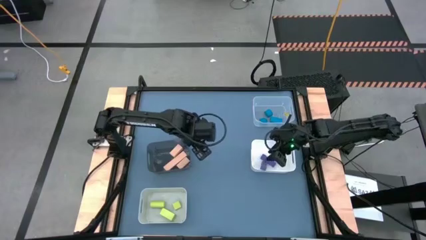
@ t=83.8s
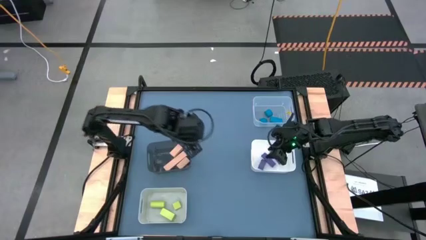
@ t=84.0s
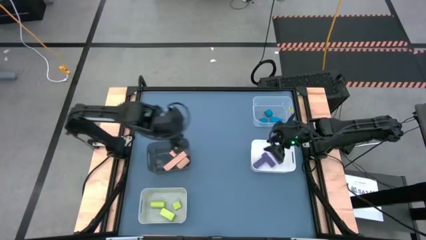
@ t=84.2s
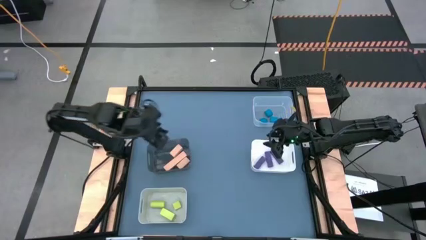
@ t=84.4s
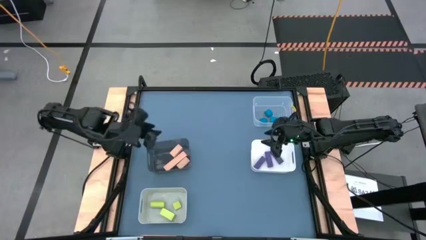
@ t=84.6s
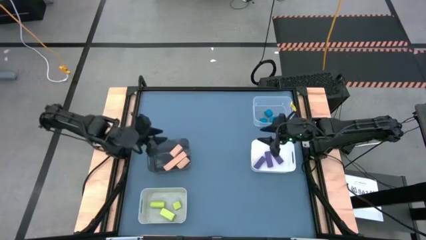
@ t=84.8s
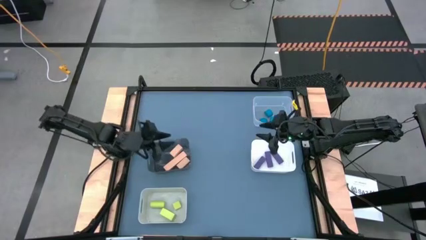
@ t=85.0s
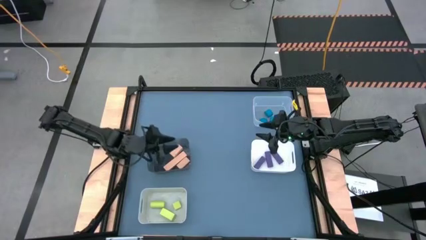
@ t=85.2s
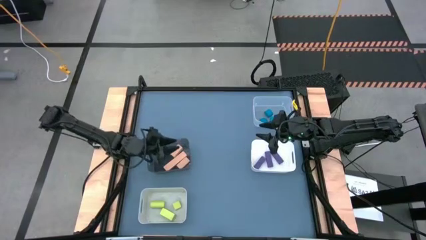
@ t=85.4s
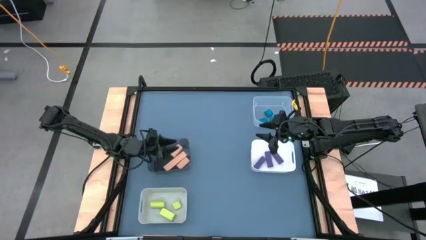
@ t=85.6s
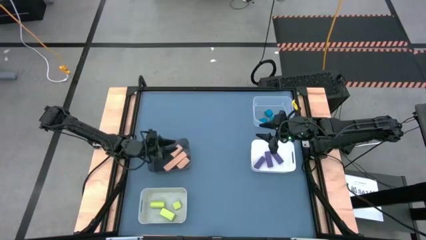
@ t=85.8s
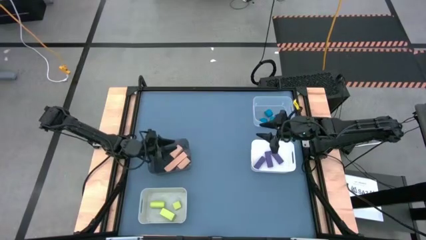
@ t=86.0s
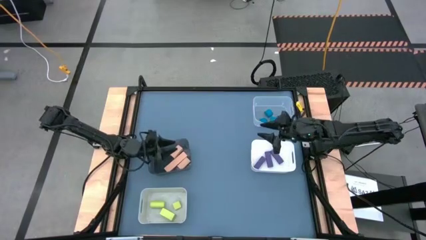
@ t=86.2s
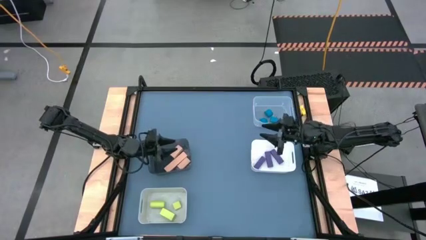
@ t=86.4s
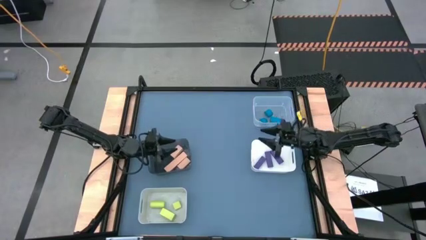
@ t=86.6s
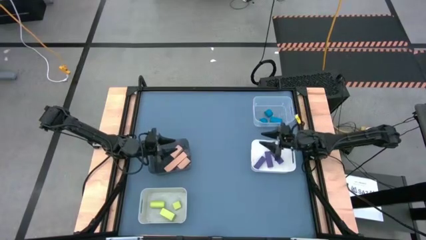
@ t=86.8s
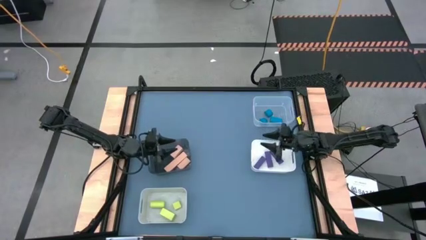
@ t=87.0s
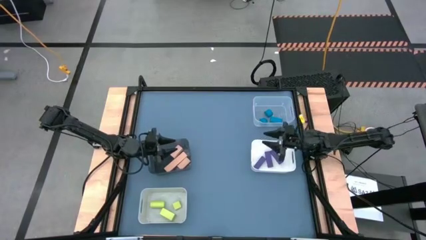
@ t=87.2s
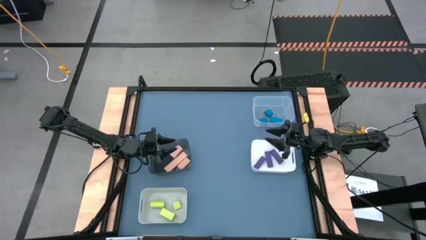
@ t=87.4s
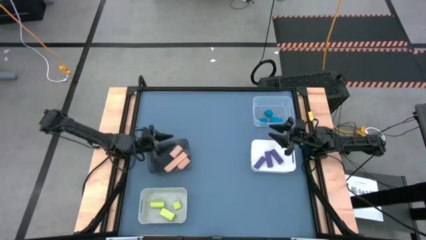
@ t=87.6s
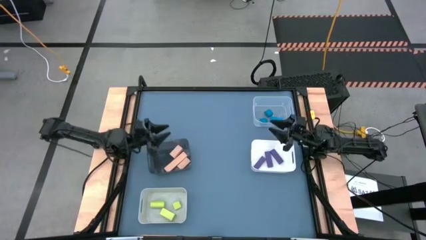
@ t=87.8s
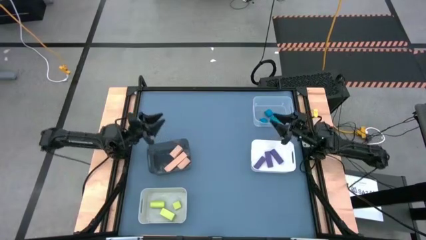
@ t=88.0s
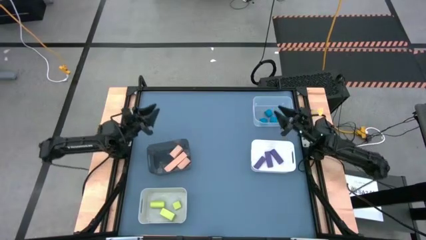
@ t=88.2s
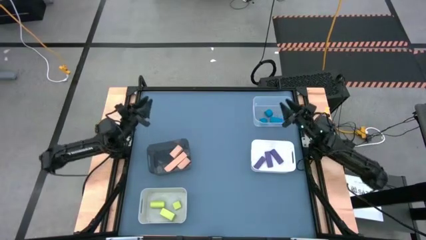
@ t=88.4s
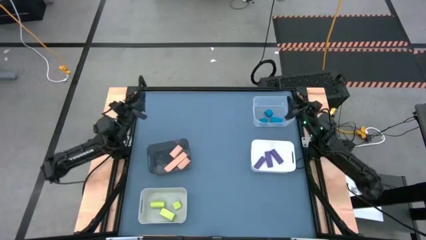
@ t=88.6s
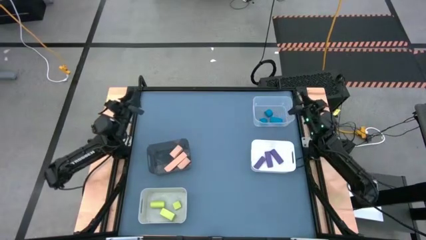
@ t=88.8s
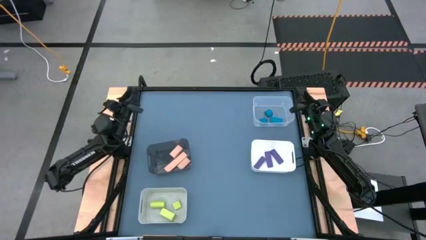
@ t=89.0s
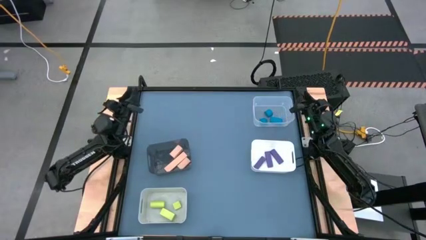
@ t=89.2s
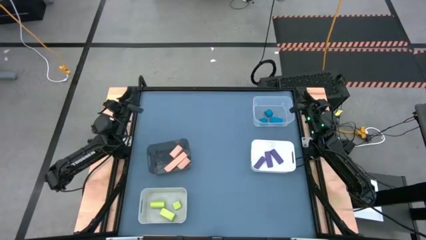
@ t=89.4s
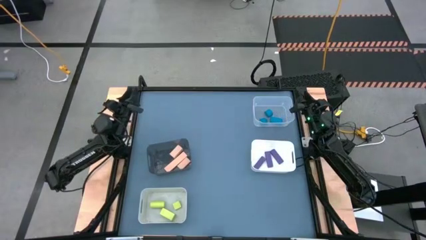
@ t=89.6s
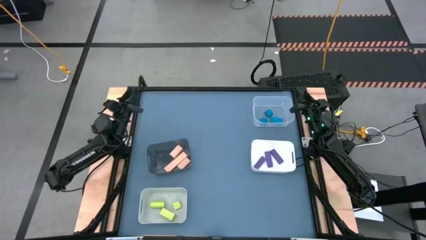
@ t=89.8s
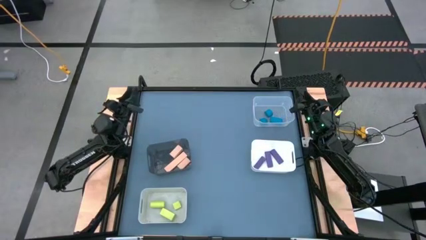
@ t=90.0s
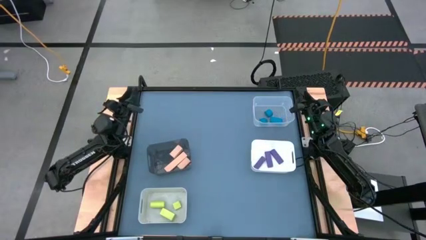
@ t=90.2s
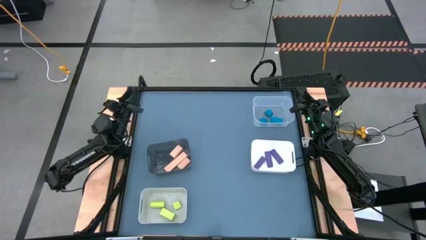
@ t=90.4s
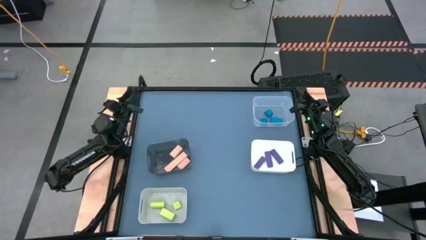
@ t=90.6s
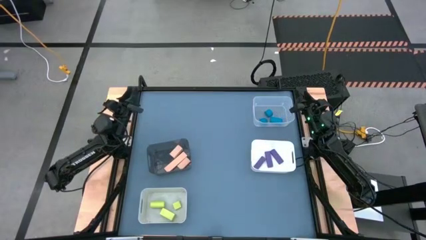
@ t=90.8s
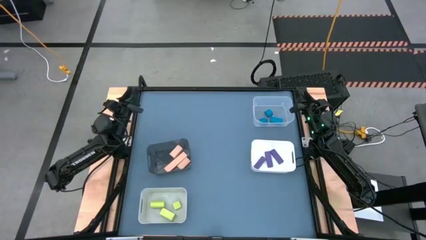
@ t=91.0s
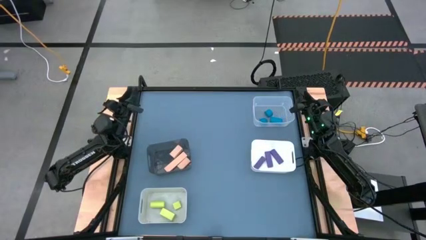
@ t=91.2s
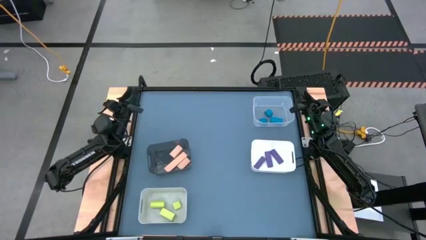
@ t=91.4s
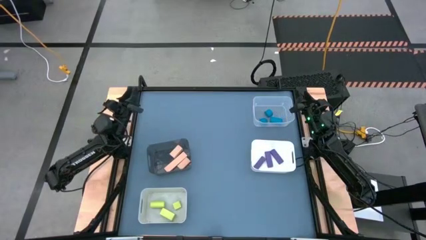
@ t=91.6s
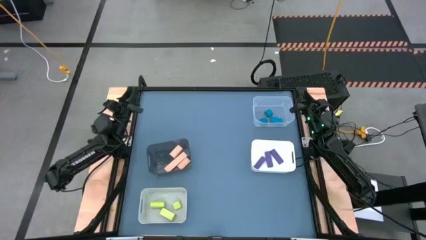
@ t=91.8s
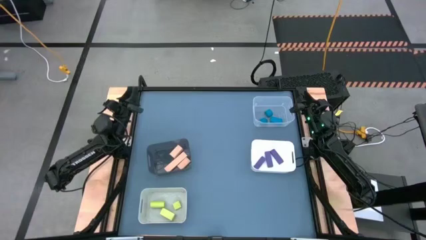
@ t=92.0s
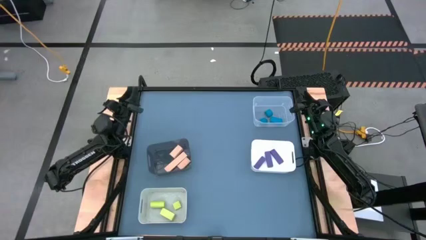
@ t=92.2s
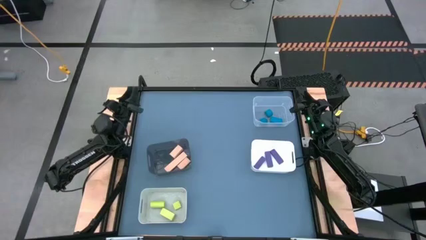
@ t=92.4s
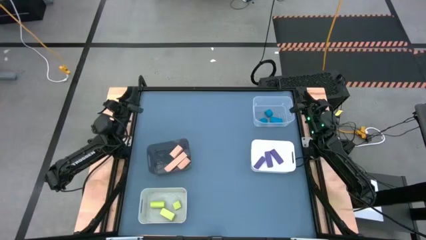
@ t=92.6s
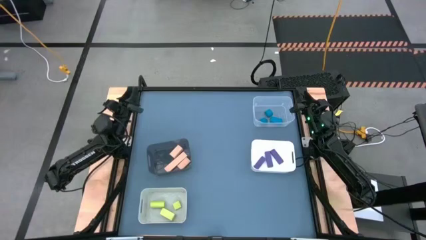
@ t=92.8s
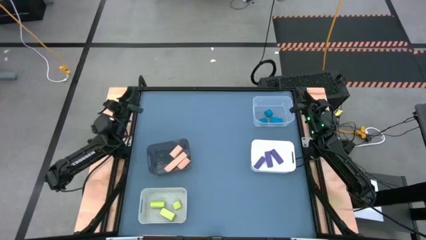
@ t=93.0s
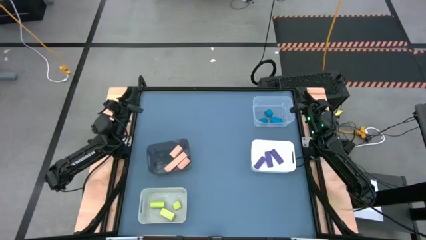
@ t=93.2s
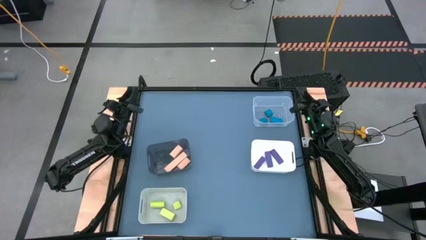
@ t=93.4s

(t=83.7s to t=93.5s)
Task: Sort & place blocks by color
Return to Home Position

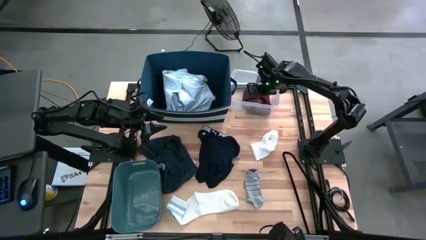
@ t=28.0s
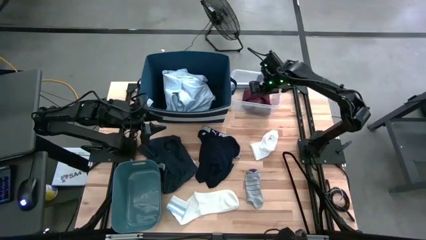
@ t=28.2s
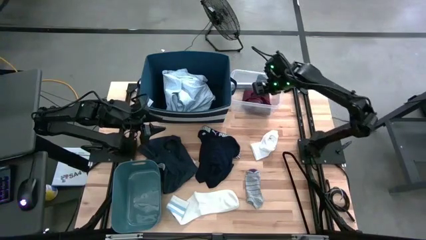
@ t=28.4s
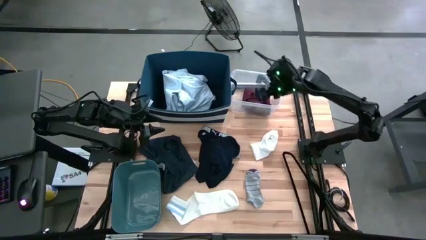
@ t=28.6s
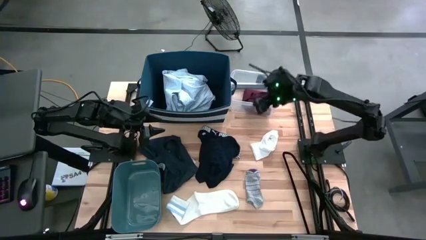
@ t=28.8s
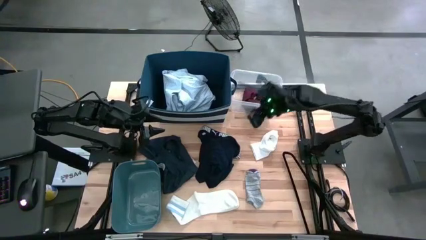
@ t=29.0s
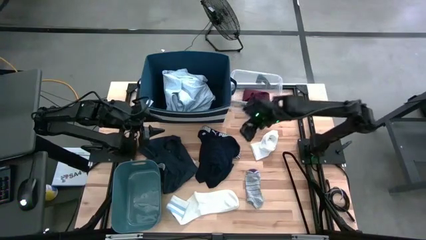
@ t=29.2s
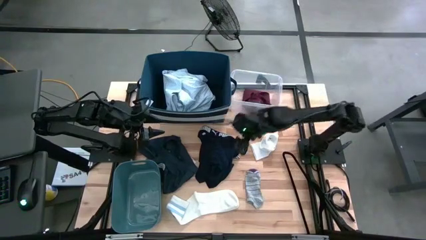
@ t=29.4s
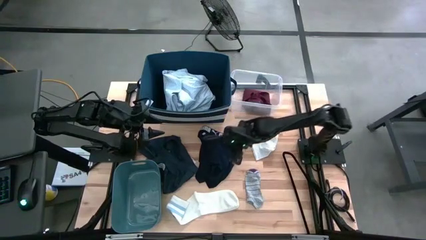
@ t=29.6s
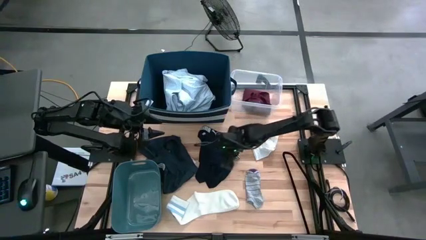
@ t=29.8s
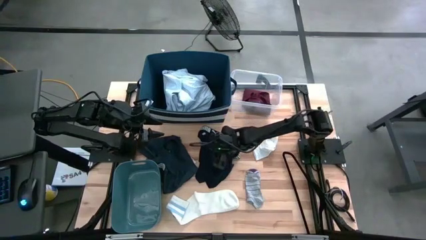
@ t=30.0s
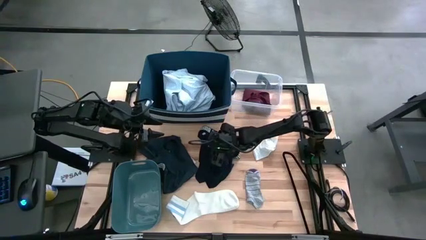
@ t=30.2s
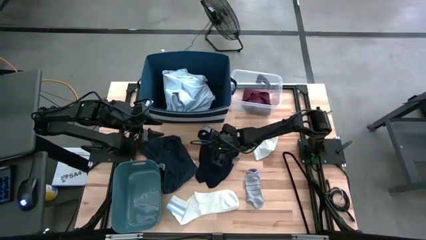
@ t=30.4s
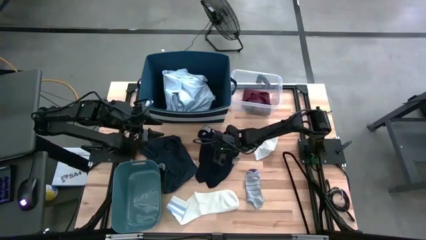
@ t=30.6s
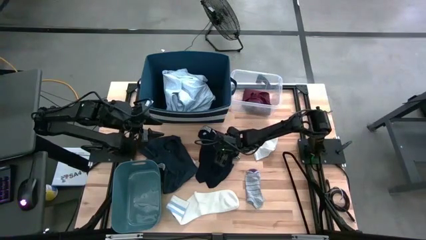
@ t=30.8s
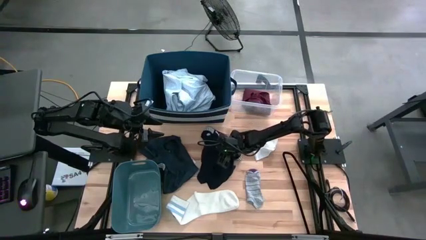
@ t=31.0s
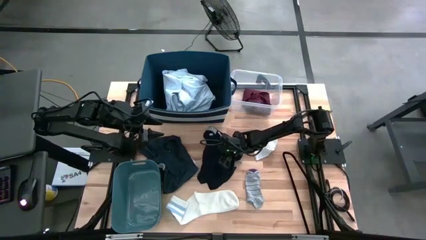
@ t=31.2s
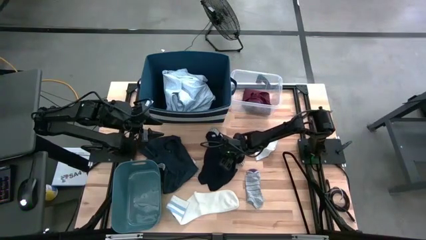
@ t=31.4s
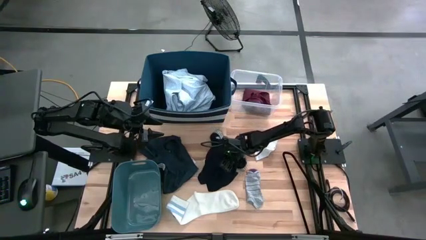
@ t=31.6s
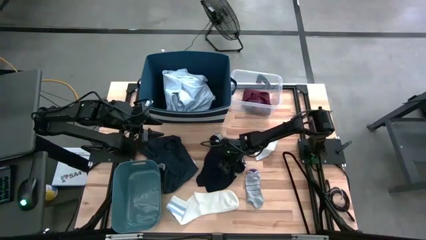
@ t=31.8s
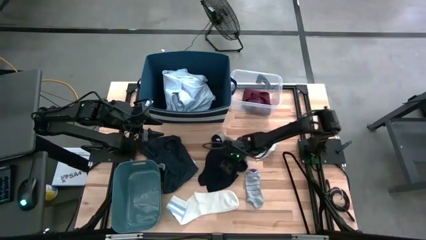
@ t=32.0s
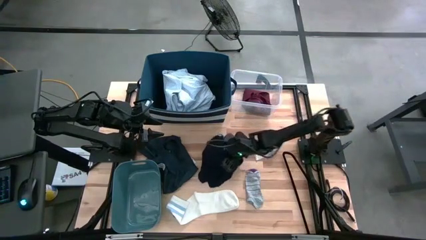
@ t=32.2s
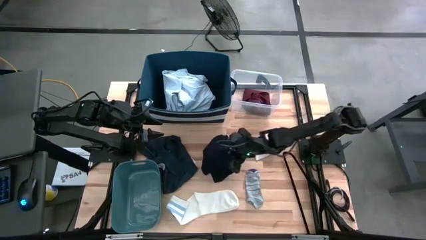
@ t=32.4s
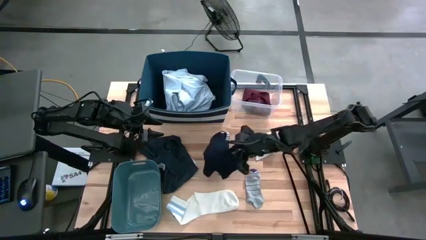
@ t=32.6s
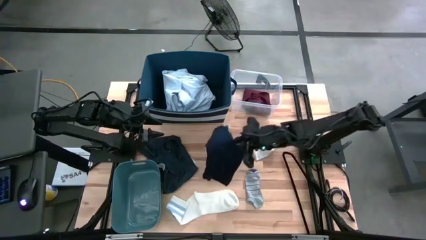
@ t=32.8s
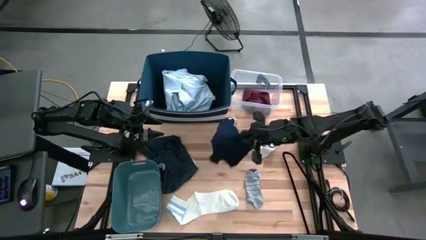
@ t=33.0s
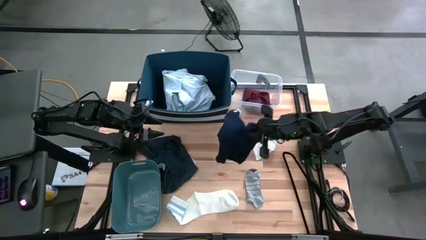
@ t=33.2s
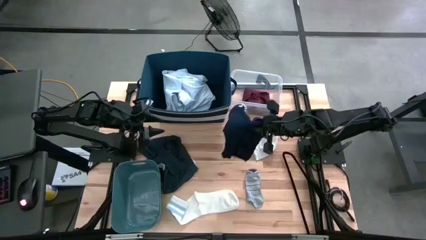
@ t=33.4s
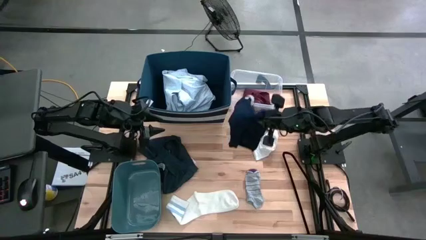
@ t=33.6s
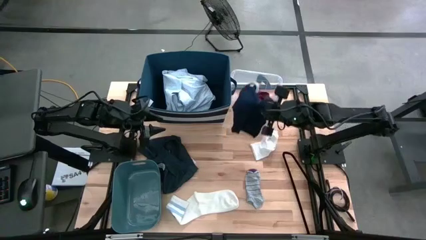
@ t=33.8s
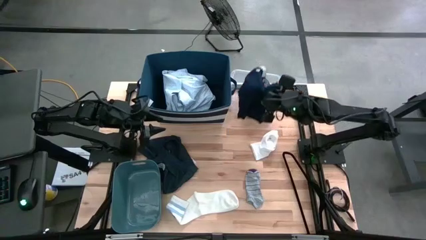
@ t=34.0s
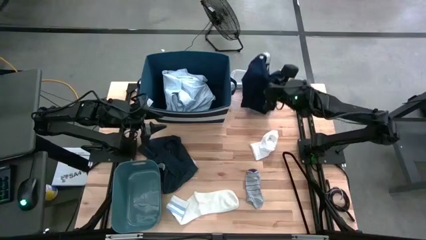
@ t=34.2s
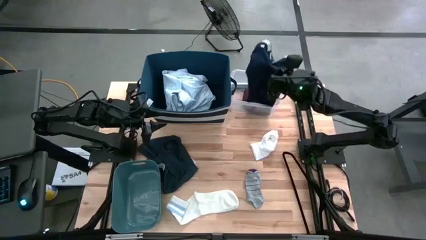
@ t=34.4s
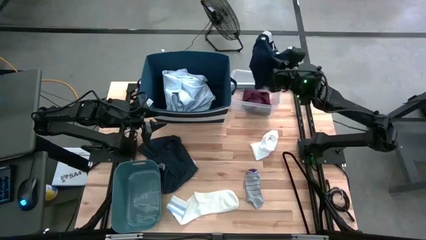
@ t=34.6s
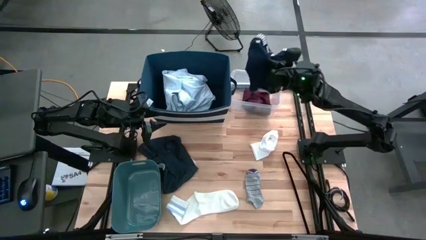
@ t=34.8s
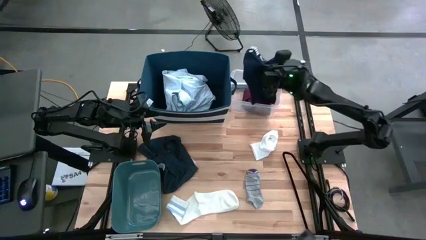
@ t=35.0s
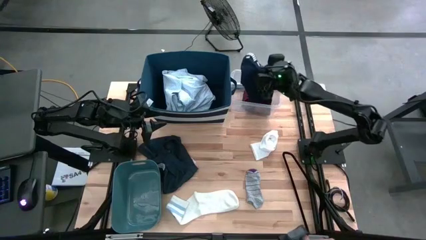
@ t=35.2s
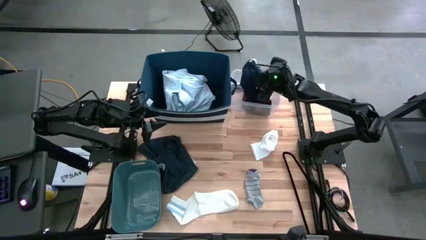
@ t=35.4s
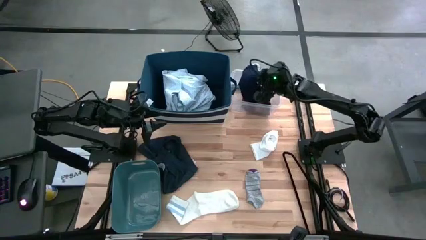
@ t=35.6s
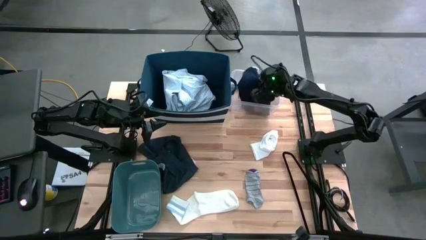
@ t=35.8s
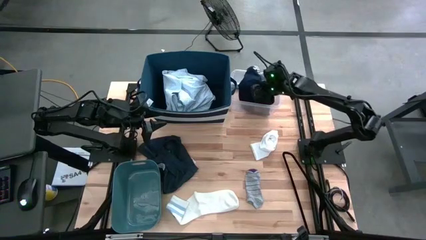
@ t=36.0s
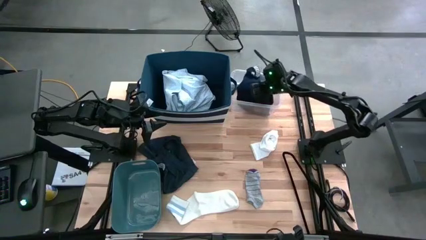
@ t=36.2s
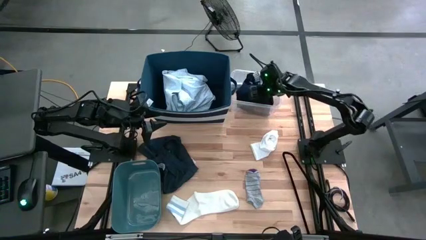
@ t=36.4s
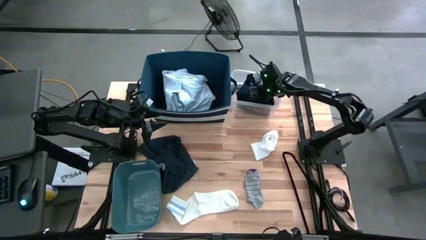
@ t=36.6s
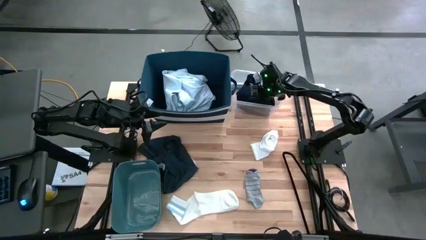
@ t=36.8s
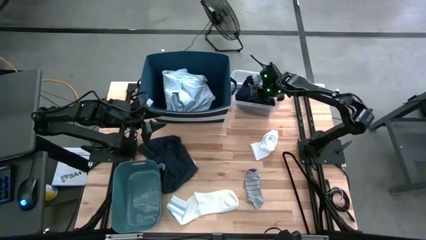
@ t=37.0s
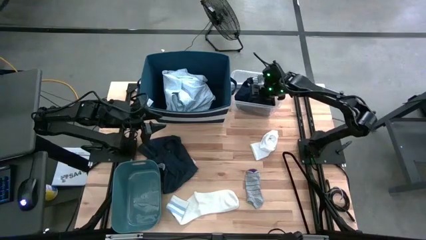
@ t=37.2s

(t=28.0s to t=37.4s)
Task: Pick & Place Cloths
Put the dark blue underwear into the transparent bin
